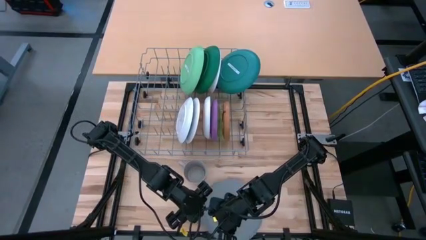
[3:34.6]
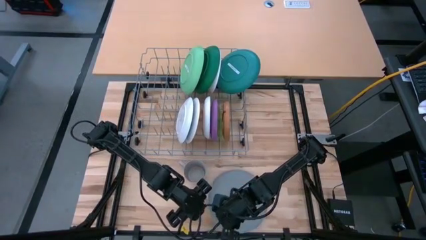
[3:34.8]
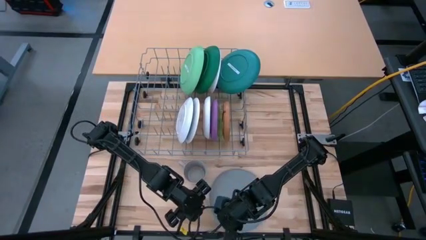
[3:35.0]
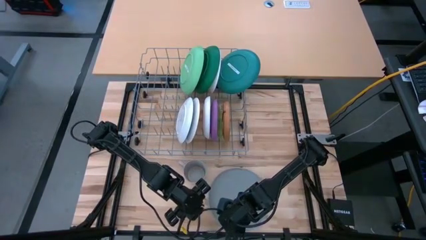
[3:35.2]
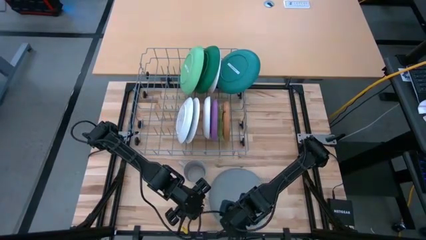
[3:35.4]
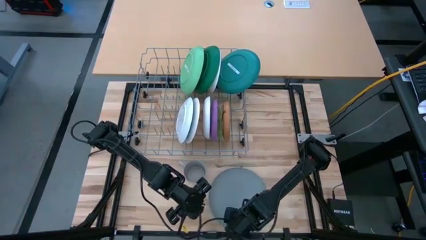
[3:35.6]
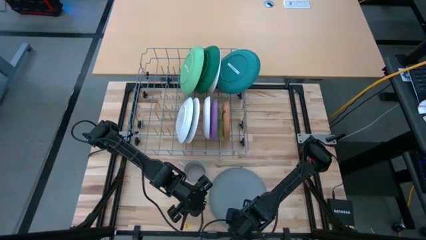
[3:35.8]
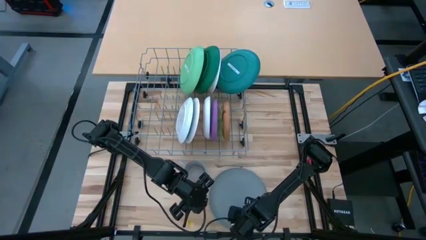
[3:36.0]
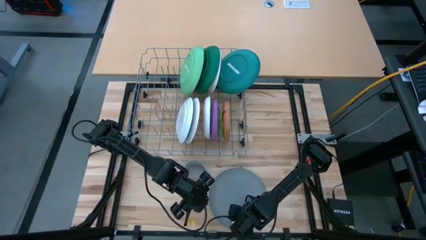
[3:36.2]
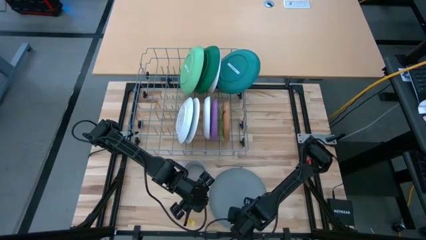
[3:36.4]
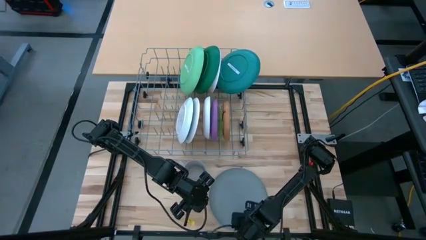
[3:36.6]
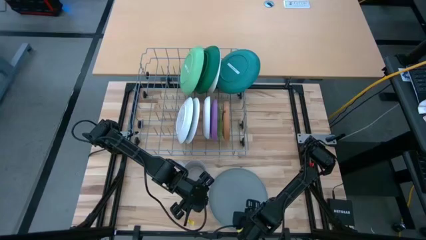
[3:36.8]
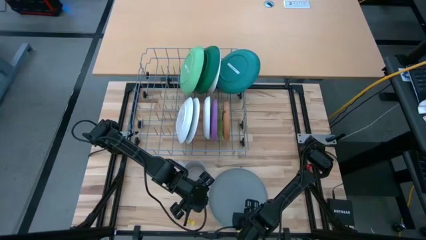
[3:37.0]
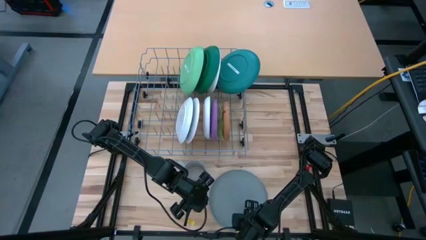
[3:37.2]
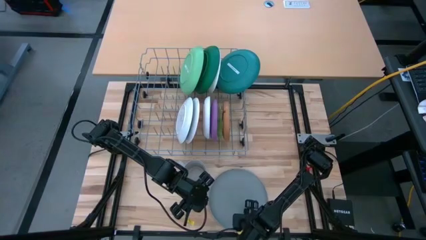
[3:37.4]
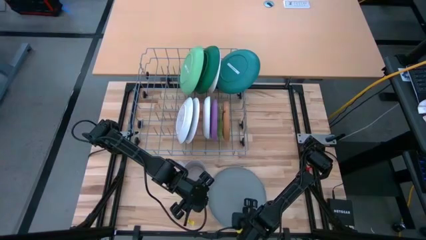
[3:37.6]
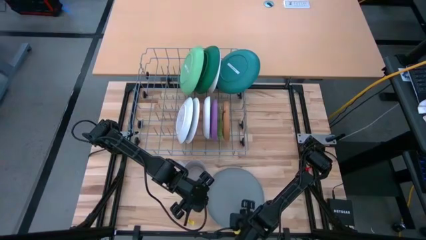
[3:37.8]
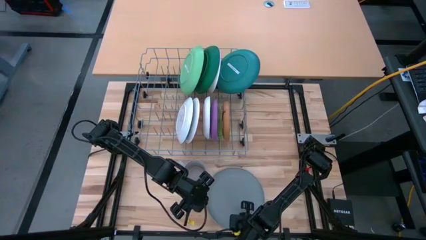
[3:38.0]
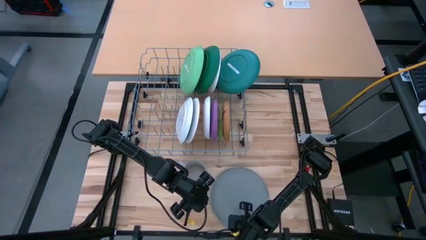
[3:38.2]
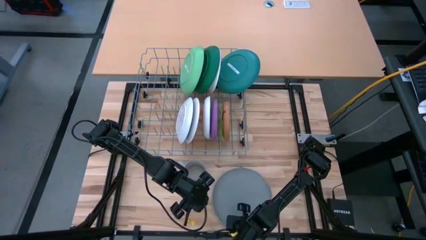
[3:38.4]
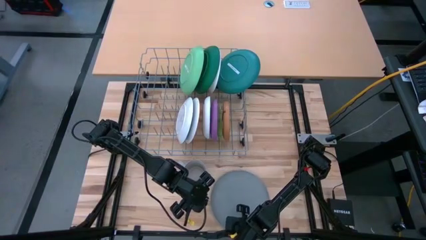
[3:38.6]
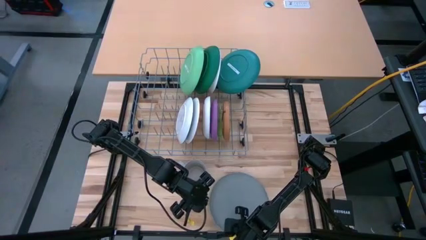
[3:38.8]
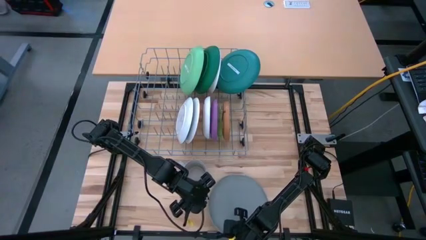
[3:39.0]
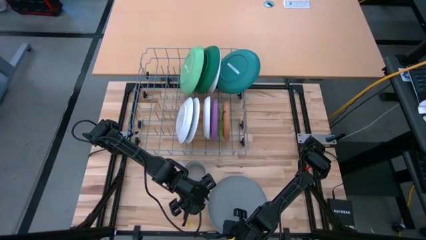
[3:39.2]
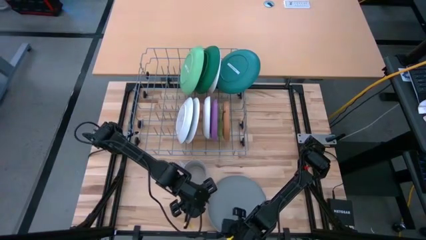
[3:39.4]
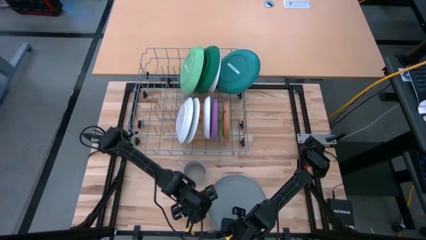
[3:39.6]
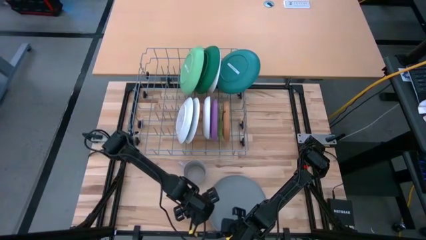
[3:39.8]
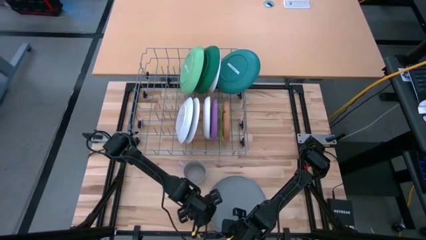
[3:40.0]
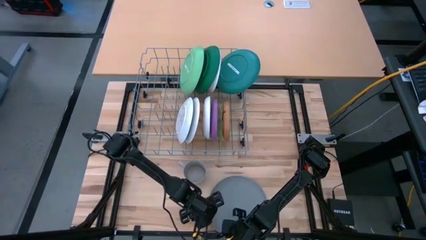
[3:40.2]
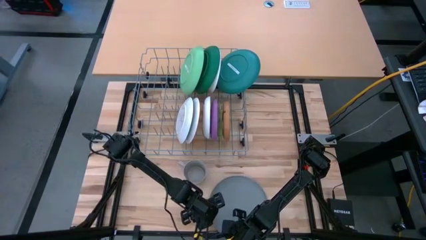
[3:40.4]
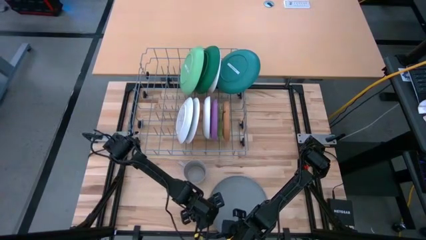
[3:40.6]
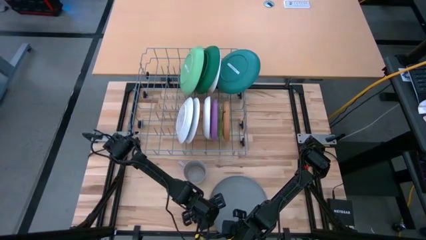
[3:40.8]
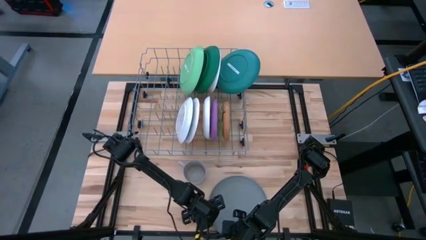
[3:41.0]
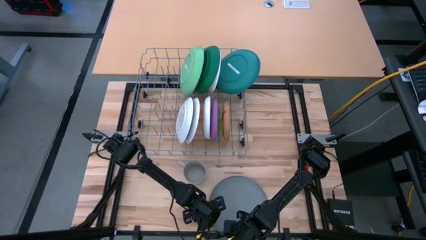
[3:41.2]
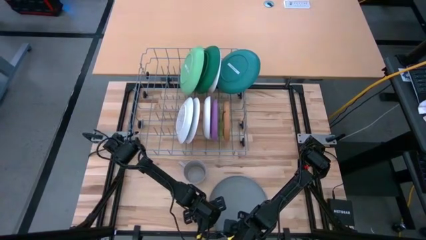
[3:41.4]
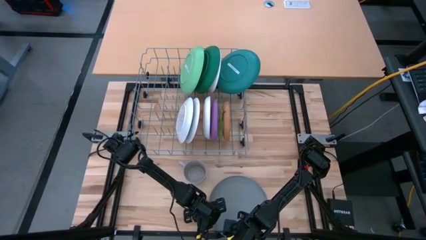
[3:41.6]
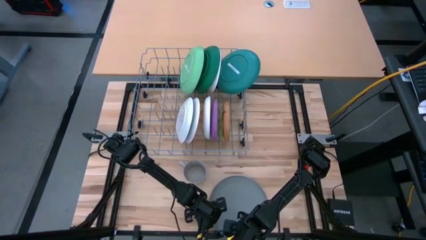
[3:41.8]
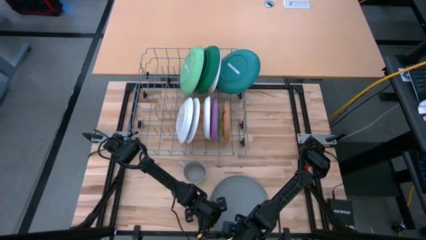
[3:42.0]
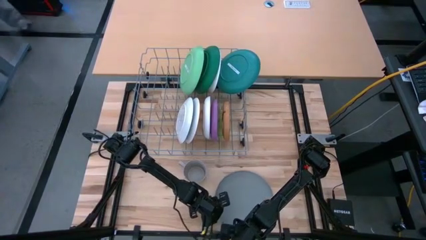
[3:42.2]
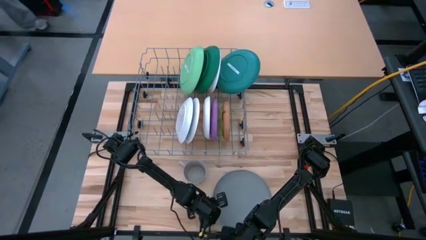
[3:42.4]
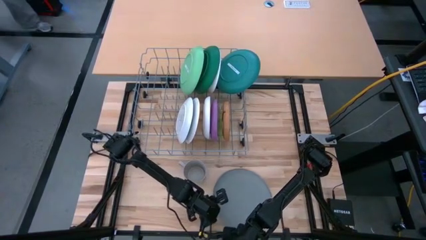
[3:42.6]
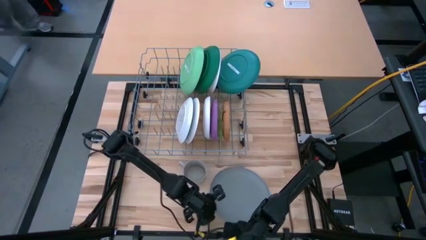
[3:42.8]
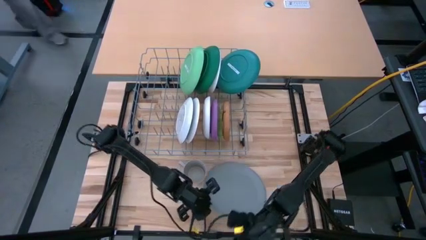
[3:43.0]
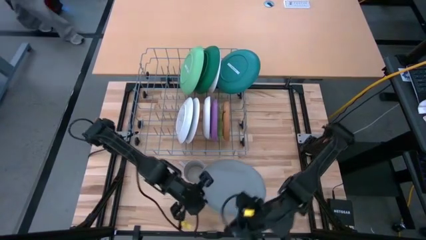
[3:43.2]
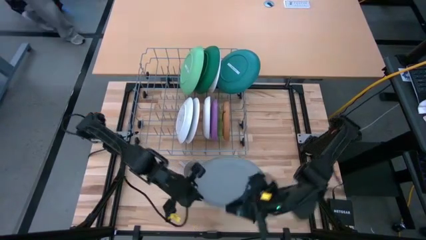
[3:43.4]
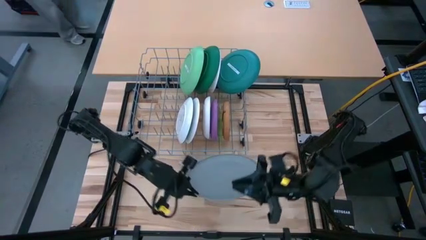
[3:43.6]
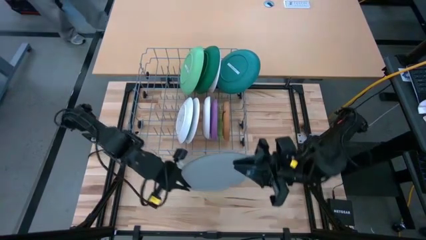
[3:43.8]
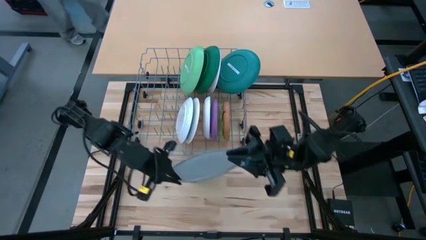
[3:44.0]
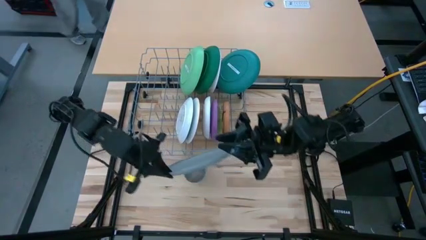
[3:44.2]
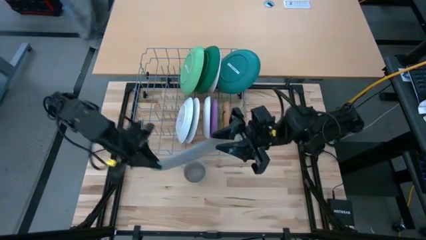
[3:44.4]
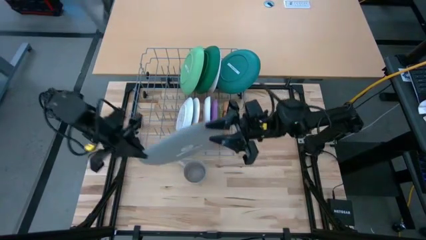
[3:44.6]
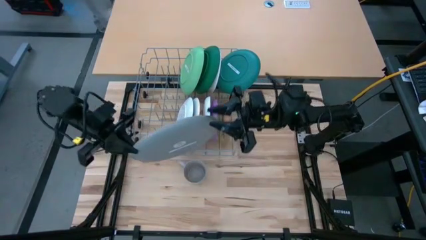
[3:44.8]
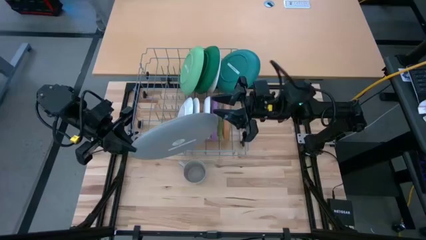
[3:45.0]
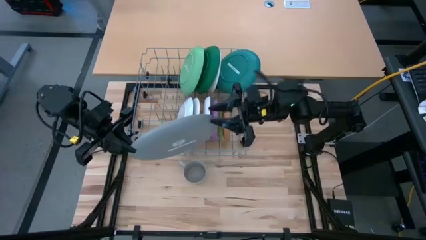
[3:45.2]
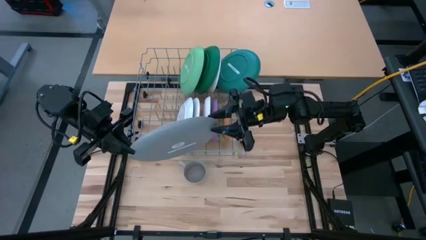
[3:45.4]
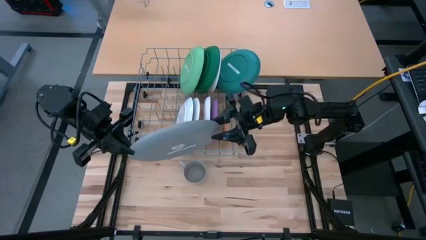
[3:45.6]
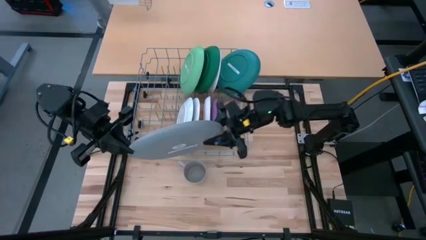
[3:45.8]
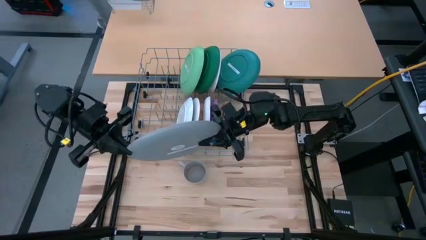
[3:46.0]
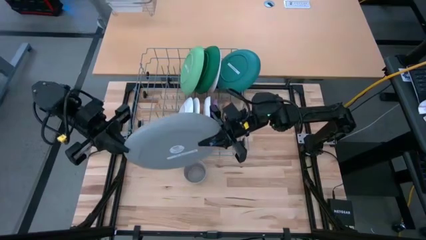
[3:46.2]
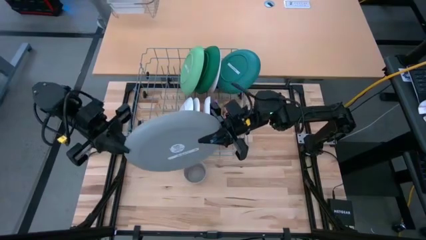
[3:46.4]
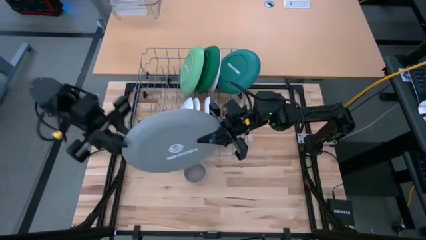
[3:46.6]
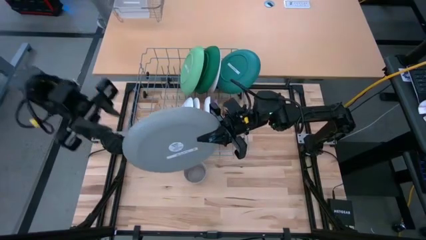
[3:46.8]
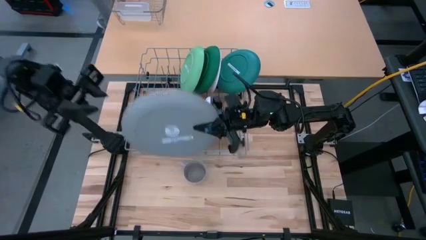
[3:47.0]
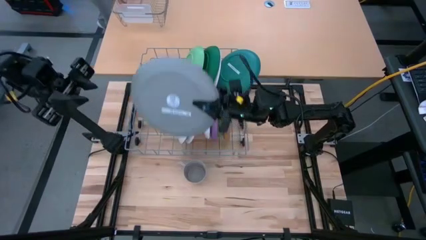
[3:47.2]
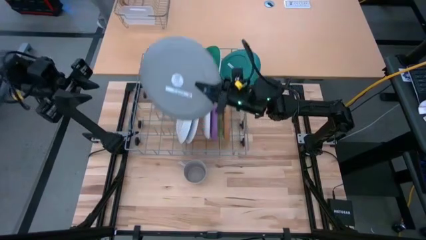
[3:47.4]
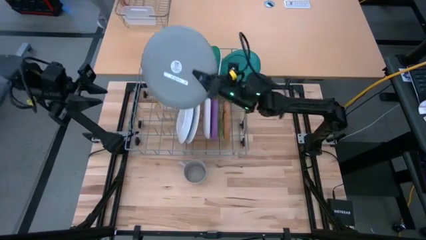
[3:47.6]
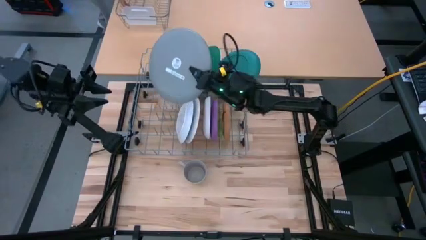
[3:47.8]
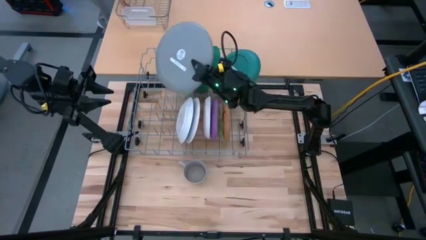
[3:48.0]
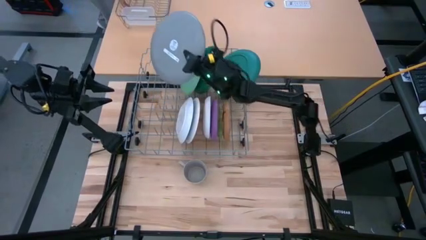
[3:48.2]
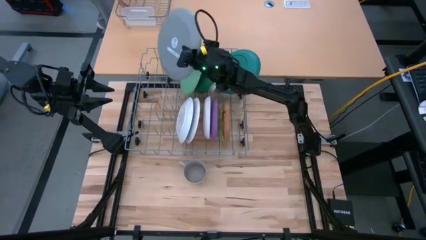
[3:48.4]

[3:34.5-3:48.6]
Task: Sort dishes
Put the gray plate in the dish rack
